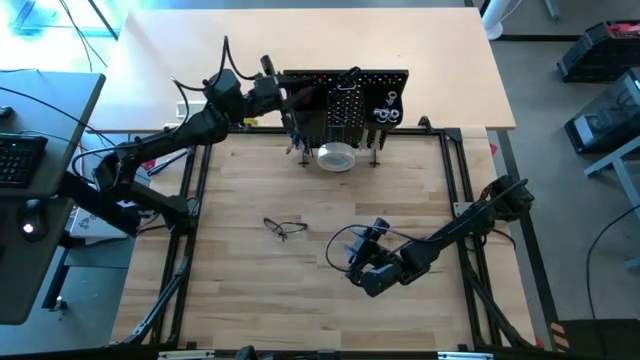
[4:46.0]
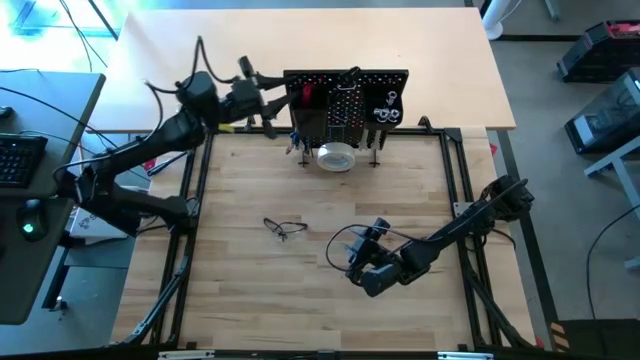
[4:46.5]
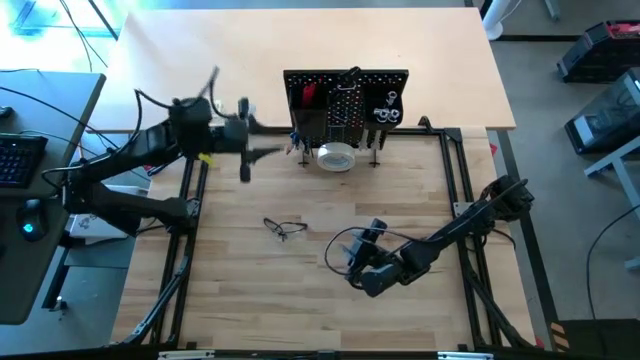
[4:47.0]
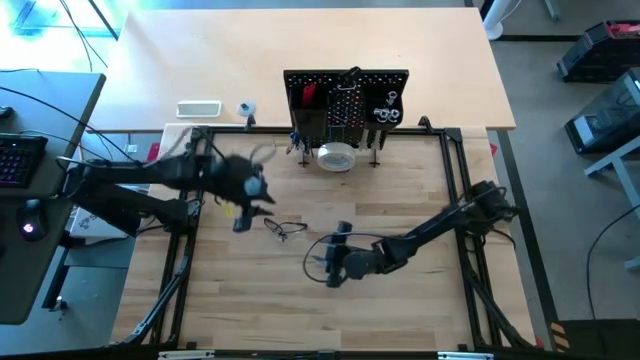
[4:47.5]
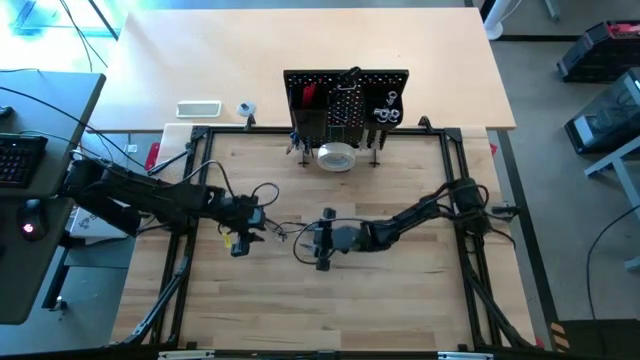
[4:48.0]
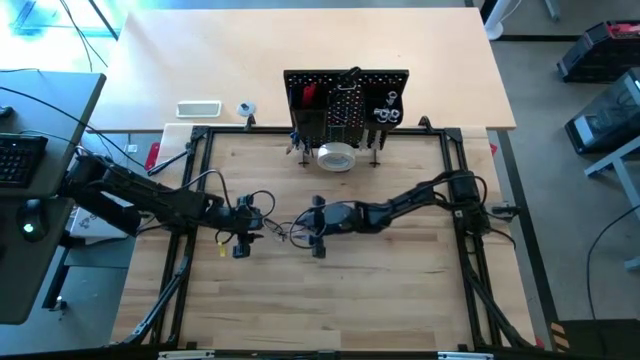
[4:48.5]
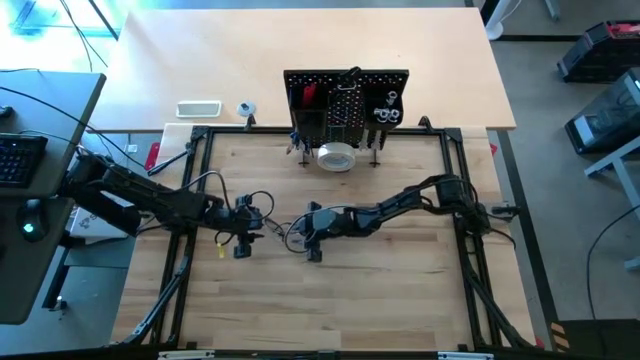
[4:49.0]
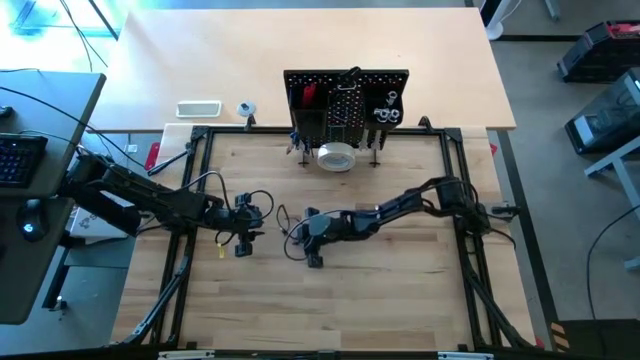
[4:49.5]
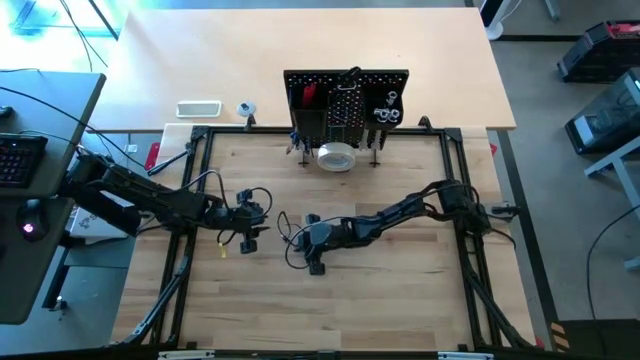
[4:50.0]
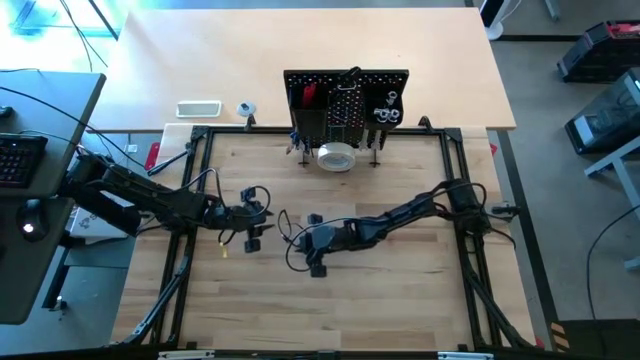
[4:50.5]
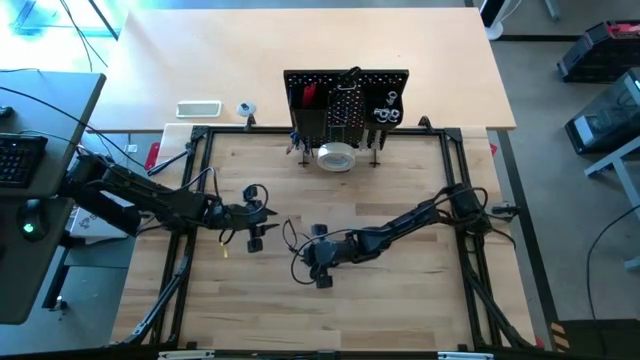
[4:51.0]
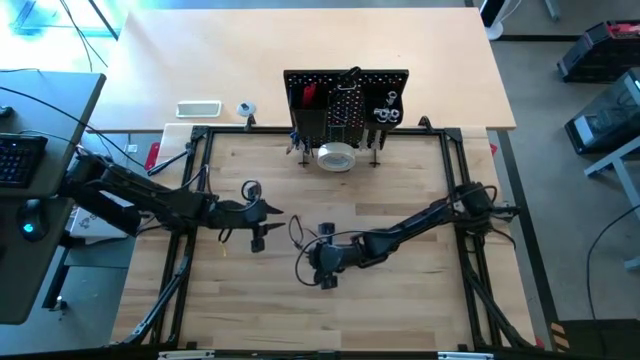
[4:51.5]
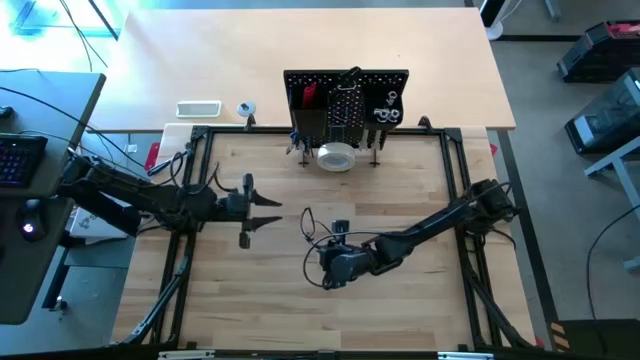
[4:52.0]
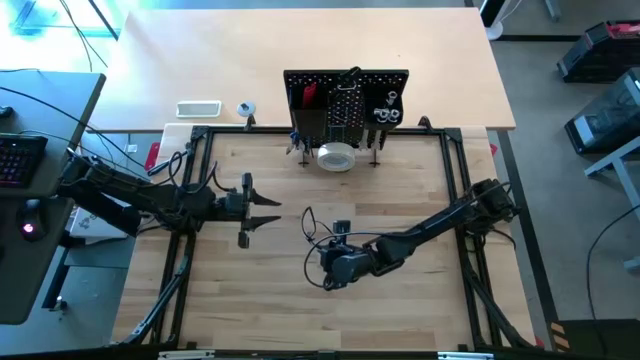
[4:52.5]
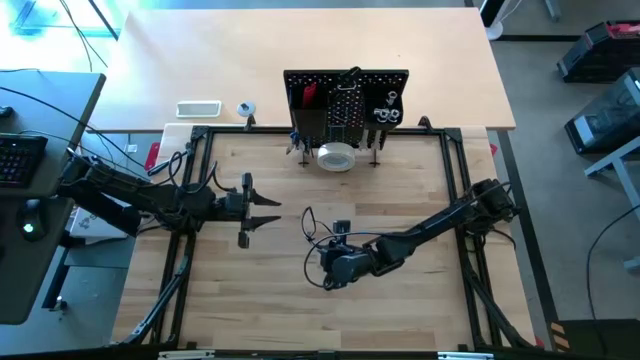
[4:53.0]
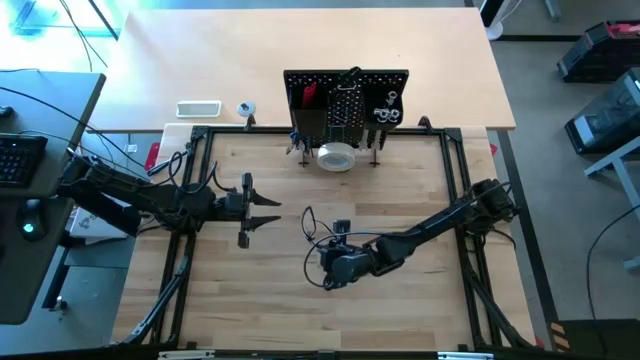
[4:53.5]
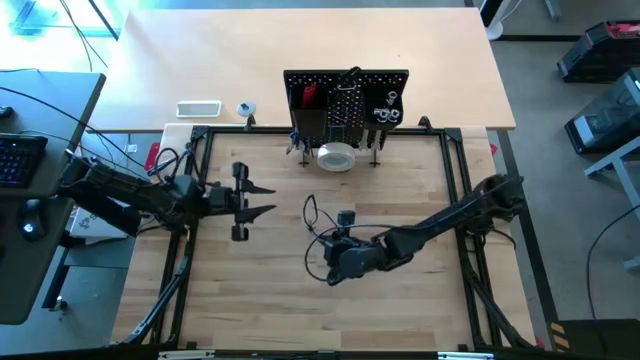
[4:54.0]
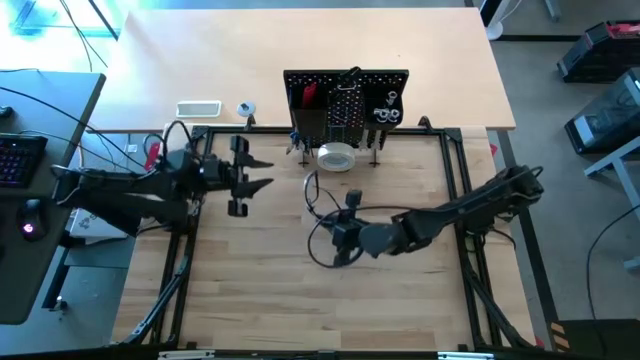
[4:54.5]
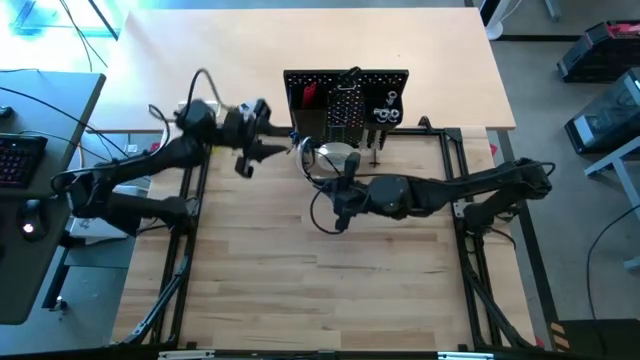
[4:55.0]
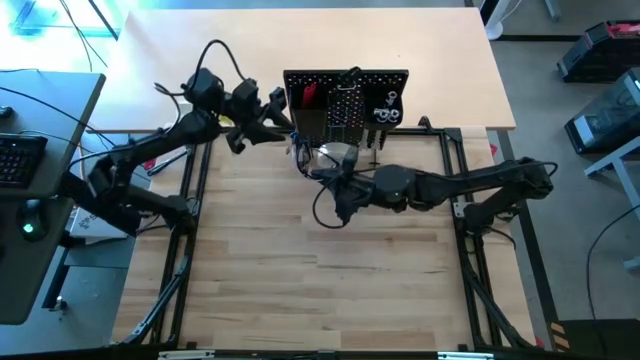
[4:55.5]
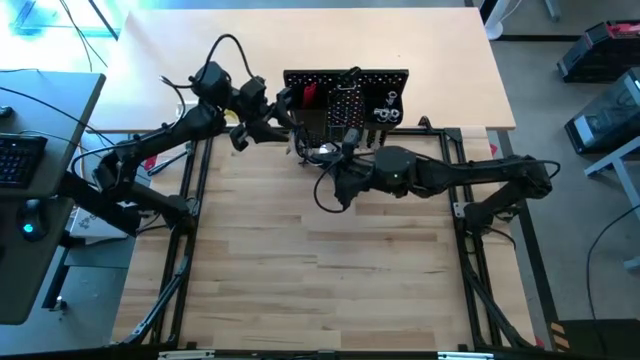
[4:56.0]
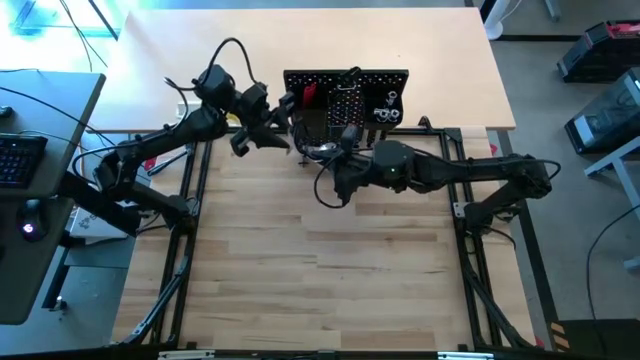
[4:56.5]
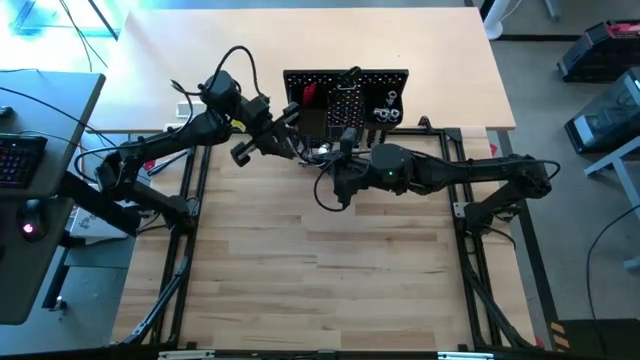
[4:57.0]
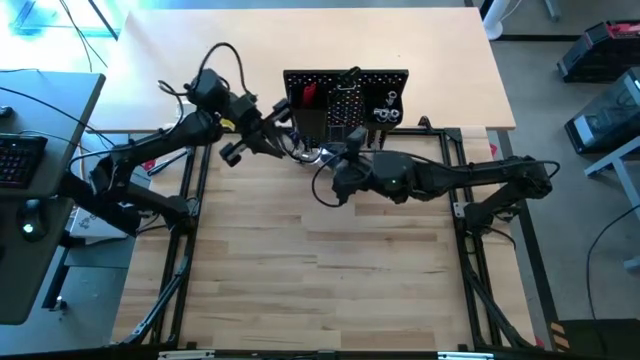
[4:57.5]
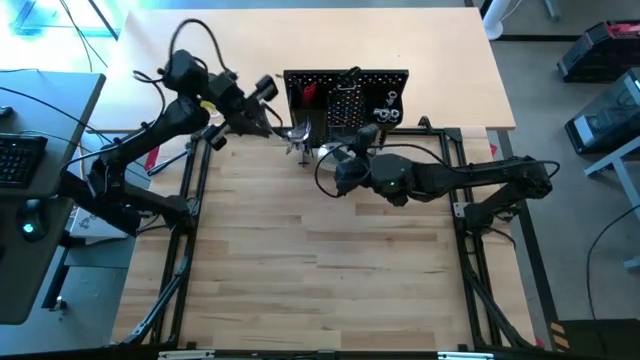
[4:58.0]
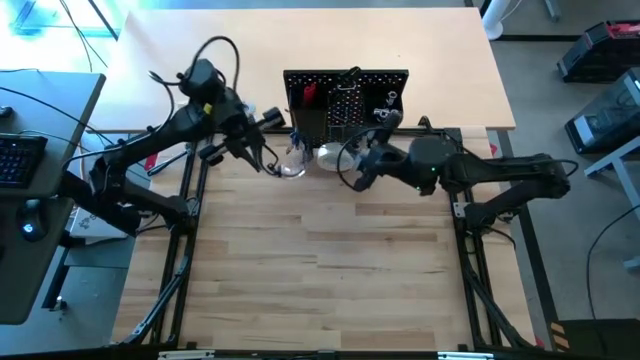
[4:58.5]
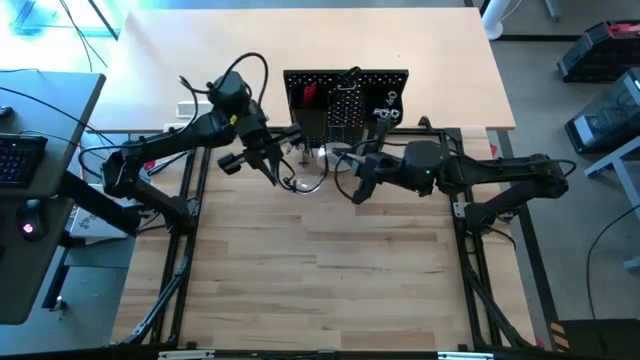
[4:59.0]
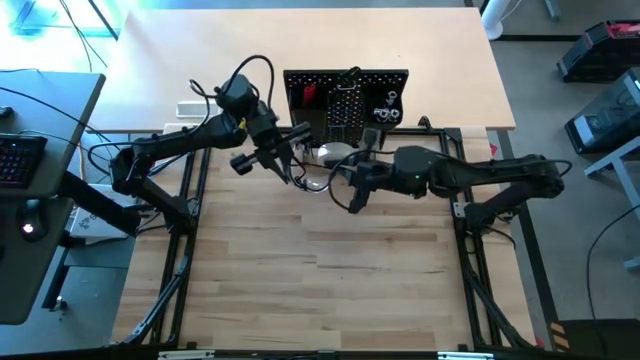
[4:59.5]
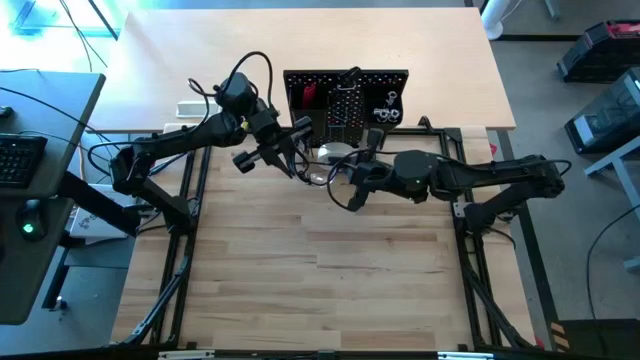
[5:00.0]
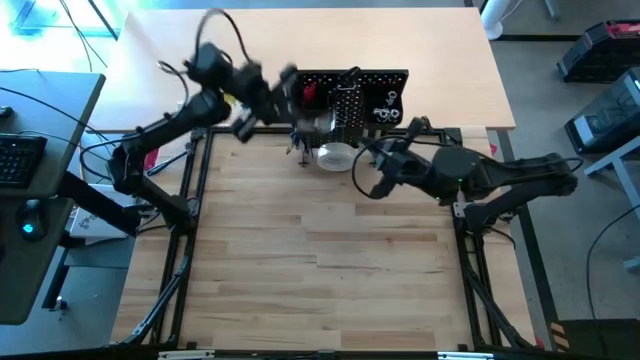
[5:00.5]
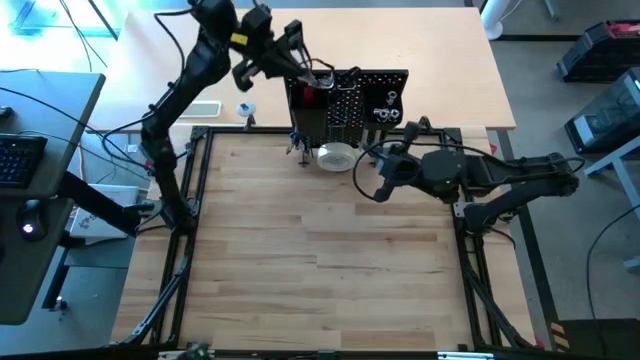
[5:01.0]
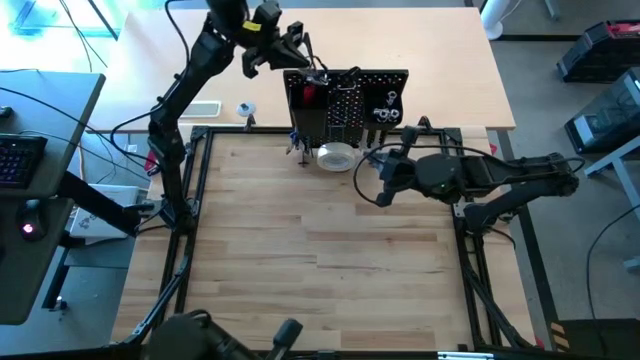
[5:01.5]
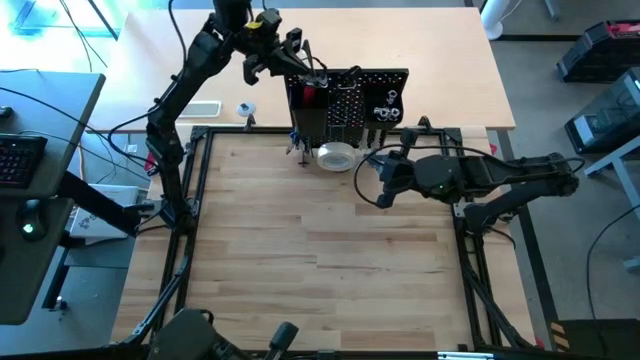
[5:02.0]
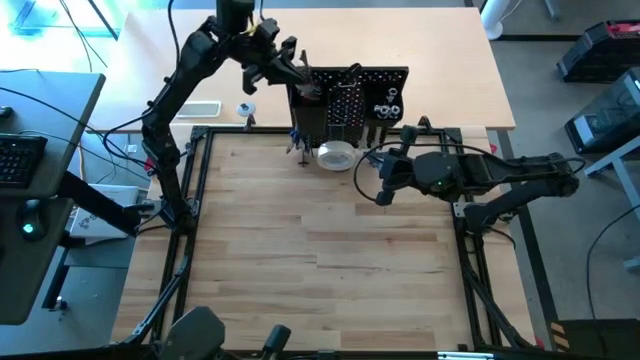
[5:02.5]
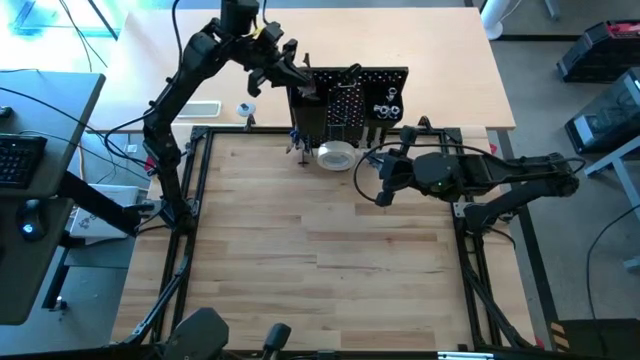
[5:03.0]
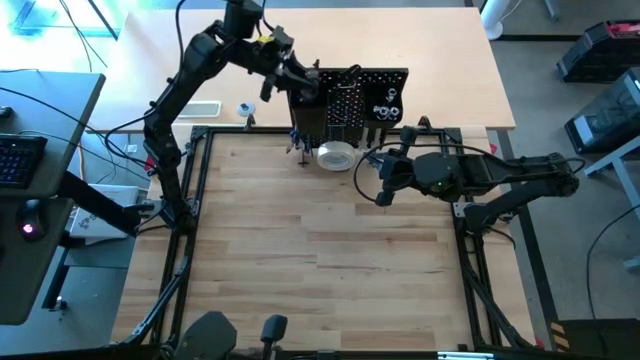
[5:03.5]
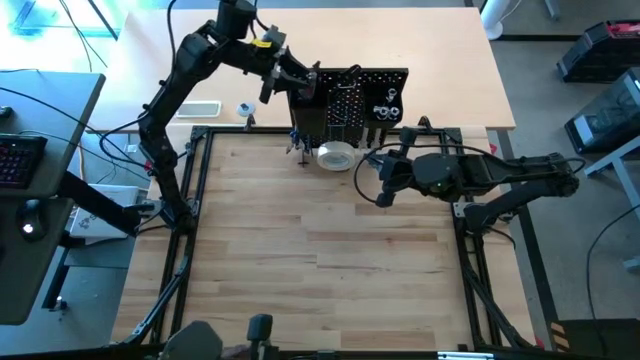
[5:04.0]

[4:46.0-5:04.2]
Task: Hang tools onto peg board
Put the transparent safety glasses into the left black bin on the peg board

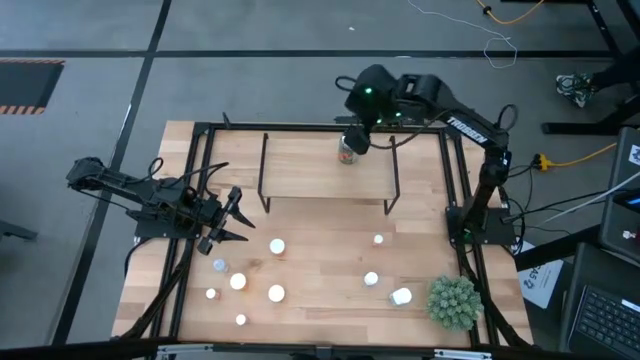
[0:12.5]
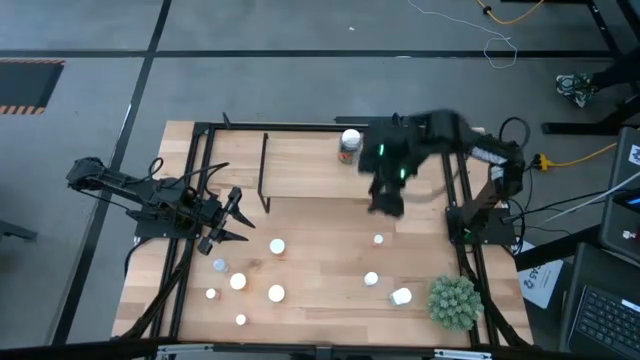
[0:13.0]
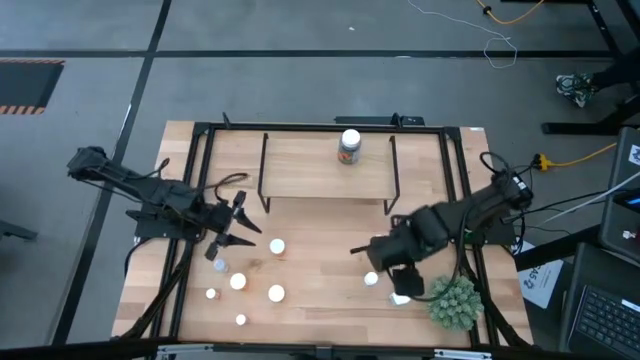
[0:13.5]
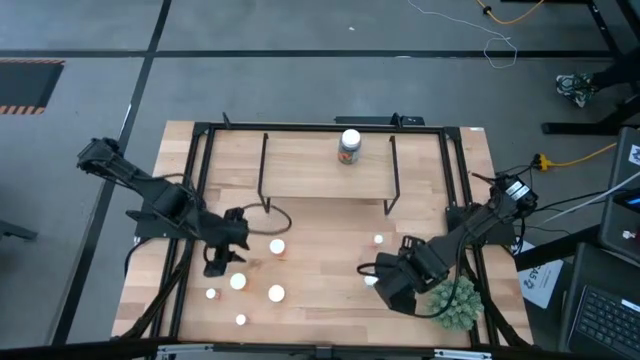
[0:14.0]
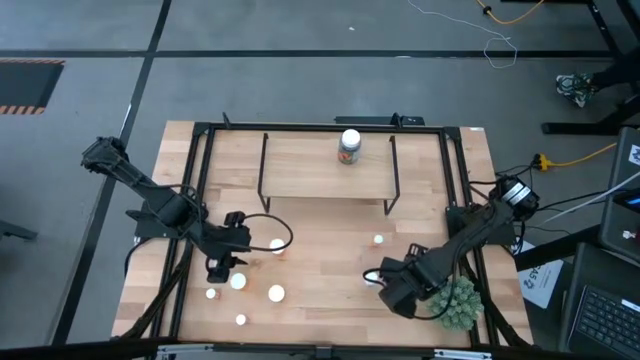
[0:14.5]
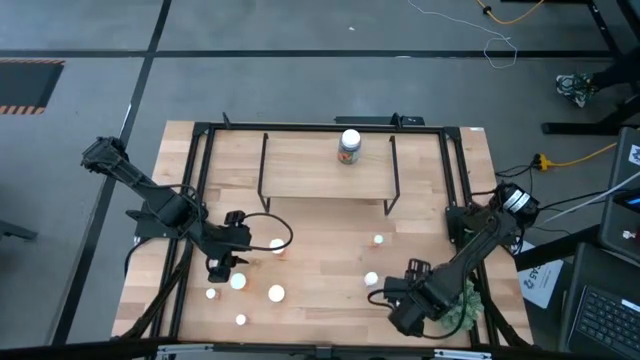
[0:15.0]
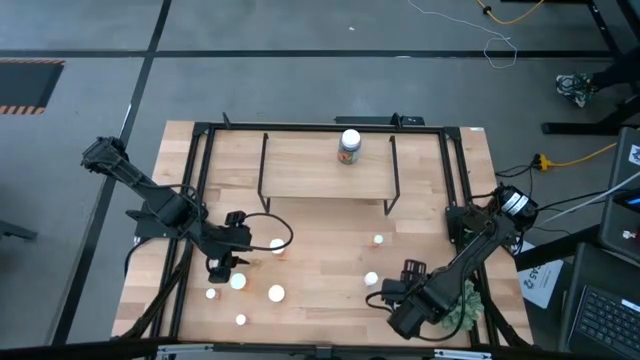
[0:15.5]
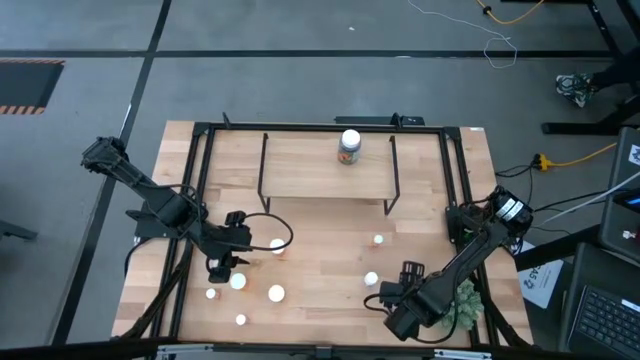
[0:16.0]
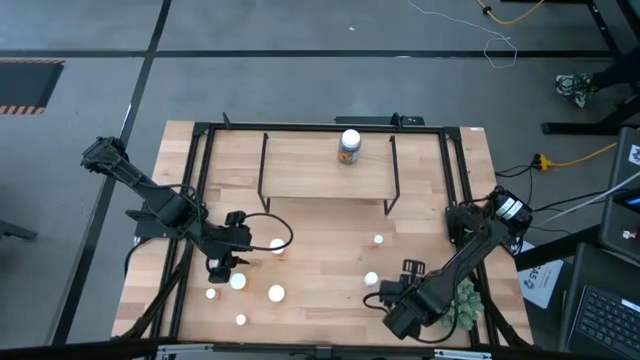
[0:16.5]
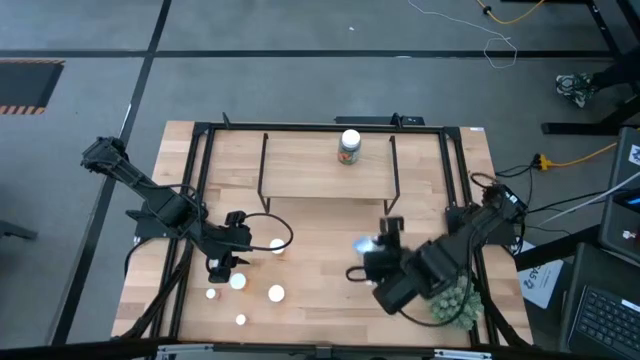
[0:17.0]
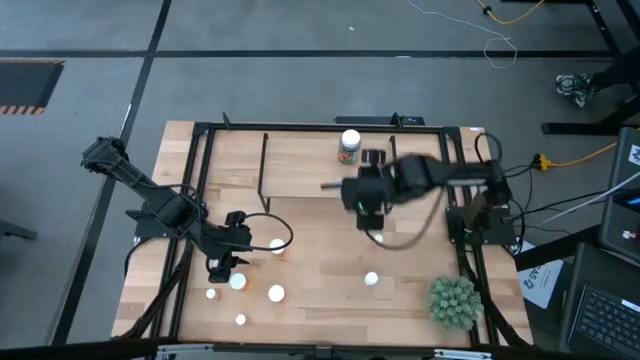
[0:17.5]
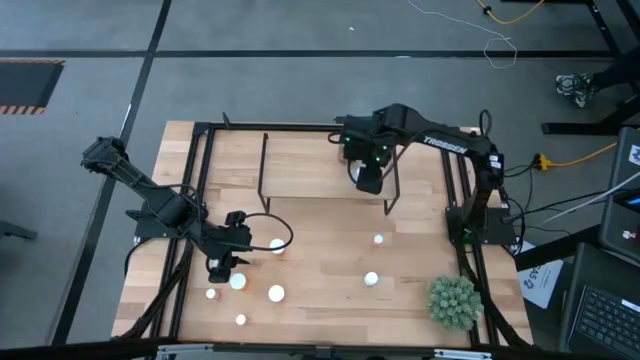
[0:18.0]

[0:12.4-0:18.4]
Task: Pick and place medicine bottles onto shelf by color
Put the white blue pill bottle on the shelf
